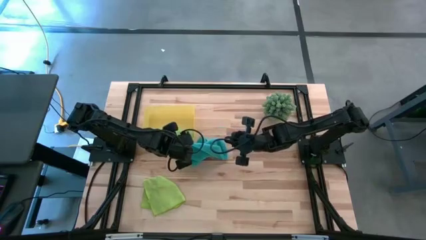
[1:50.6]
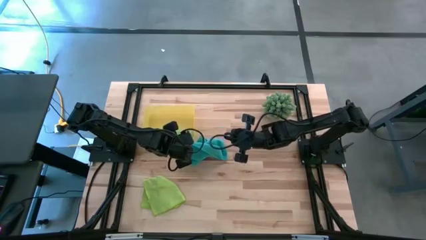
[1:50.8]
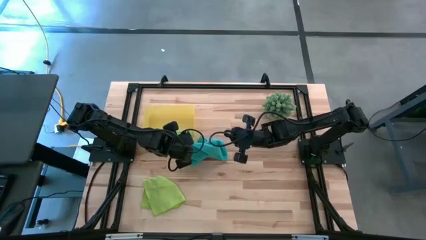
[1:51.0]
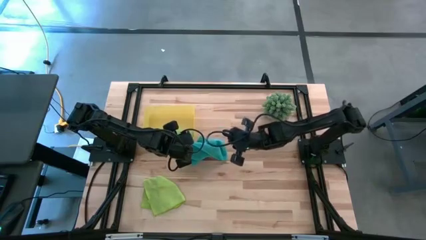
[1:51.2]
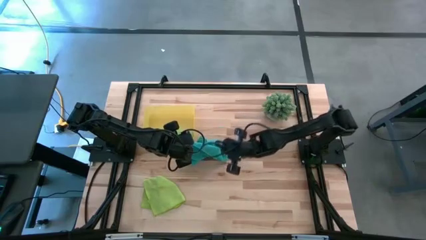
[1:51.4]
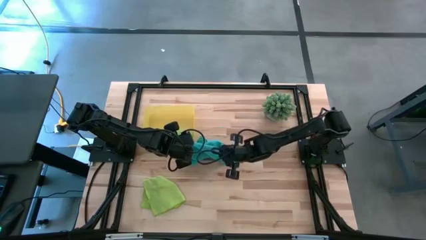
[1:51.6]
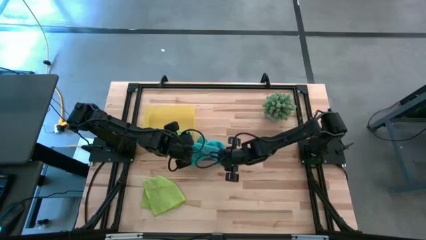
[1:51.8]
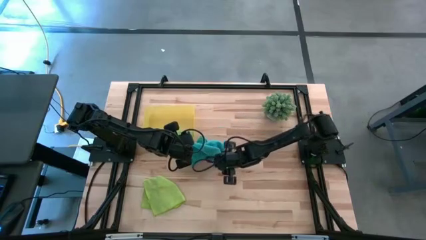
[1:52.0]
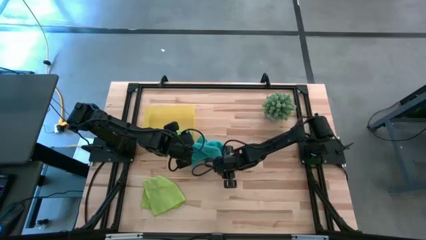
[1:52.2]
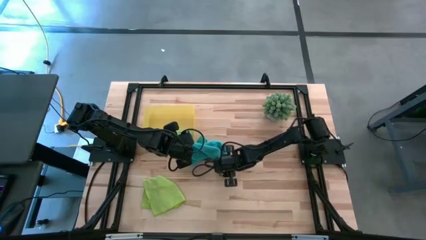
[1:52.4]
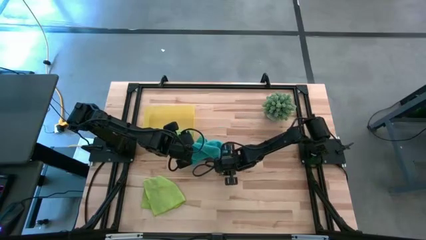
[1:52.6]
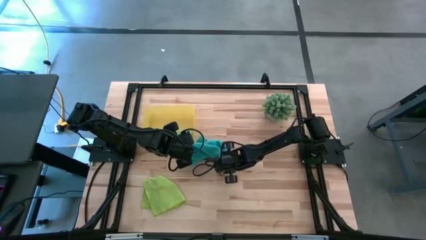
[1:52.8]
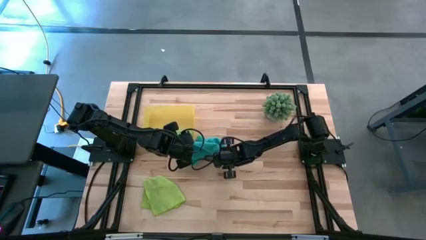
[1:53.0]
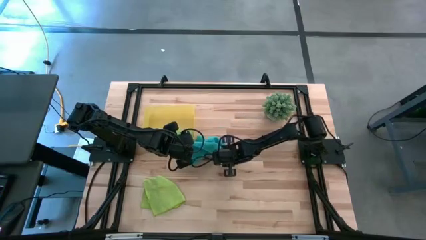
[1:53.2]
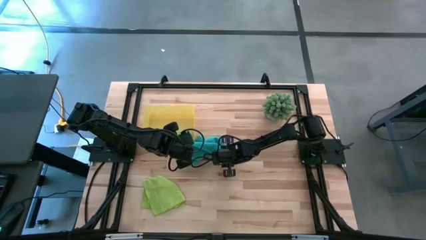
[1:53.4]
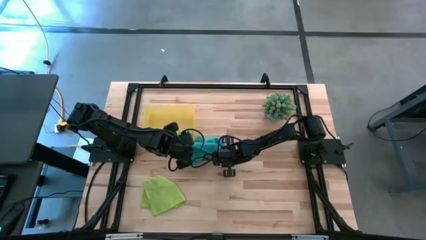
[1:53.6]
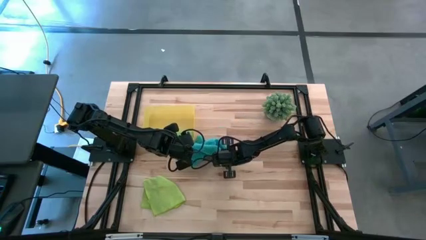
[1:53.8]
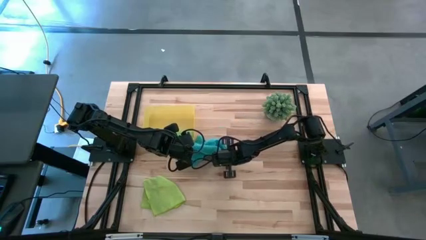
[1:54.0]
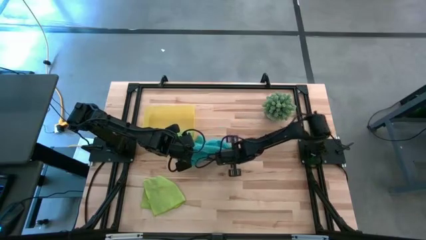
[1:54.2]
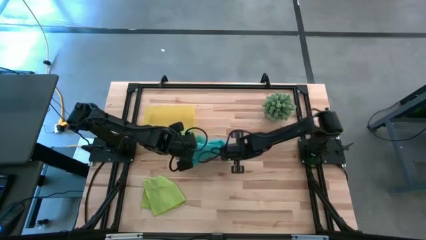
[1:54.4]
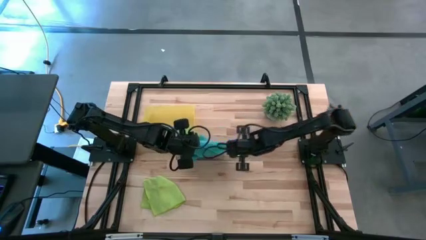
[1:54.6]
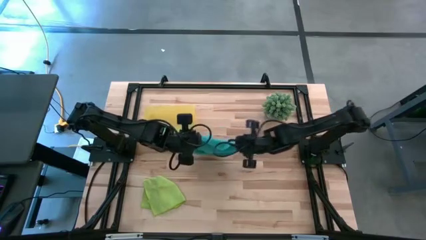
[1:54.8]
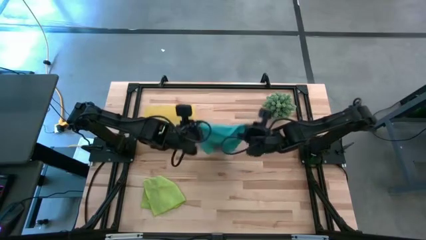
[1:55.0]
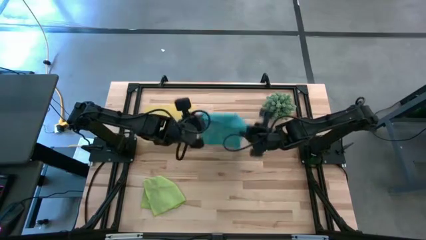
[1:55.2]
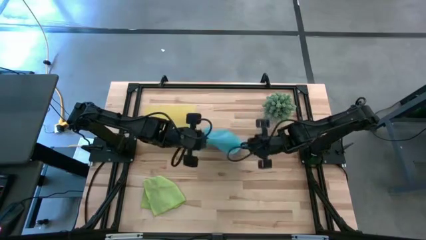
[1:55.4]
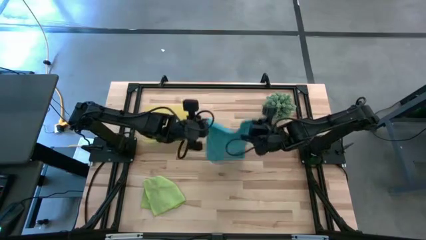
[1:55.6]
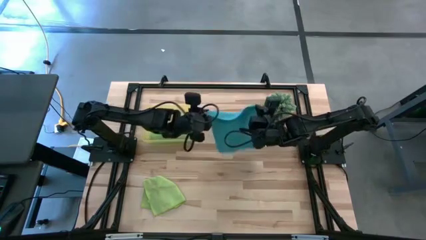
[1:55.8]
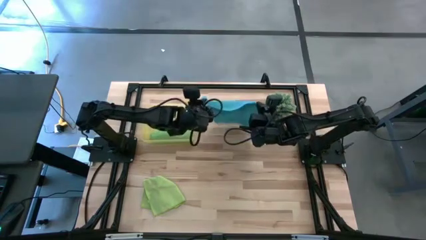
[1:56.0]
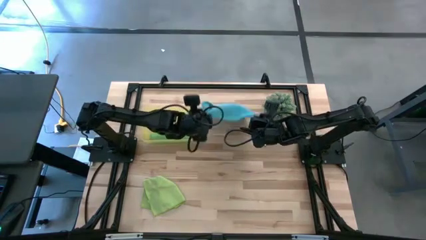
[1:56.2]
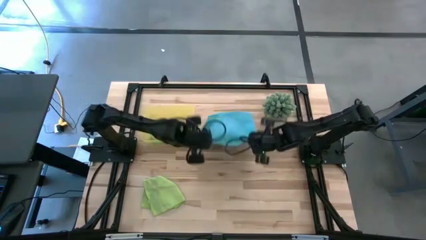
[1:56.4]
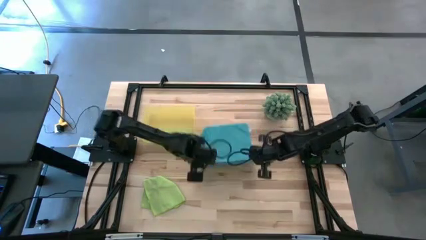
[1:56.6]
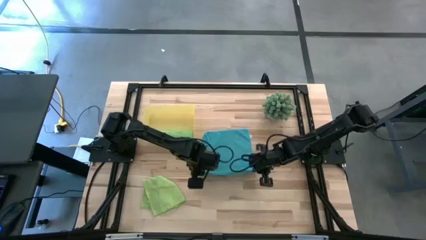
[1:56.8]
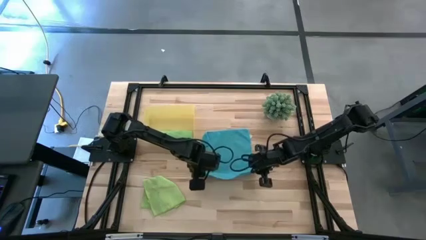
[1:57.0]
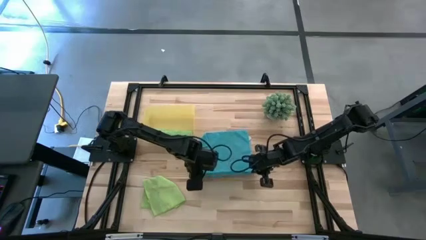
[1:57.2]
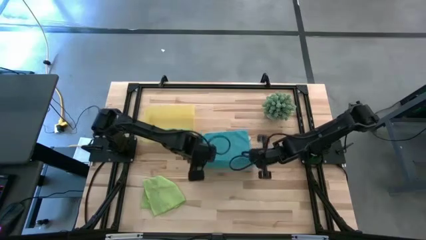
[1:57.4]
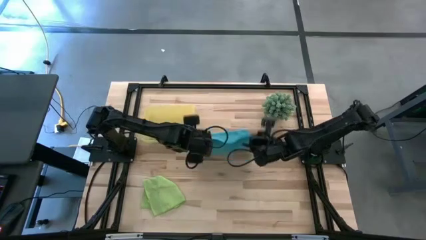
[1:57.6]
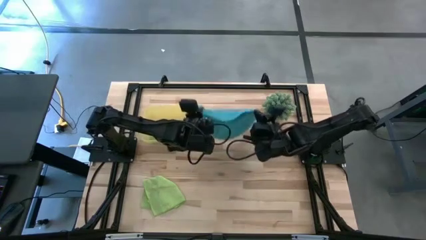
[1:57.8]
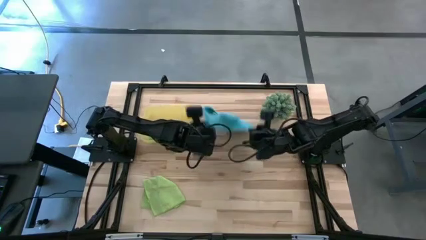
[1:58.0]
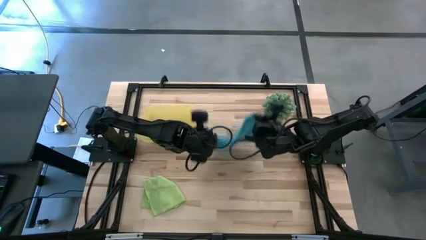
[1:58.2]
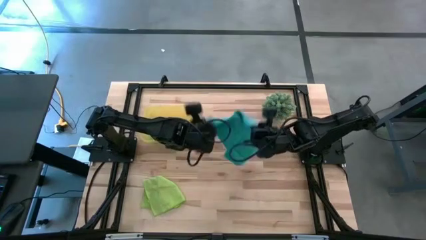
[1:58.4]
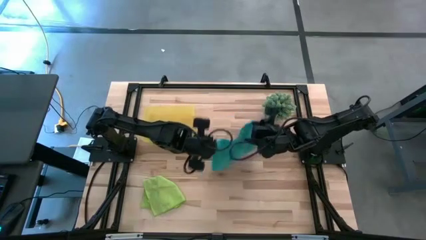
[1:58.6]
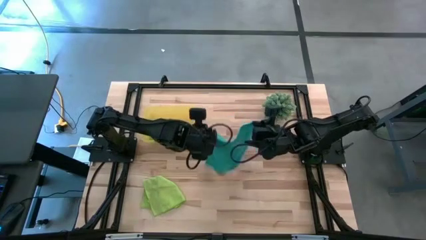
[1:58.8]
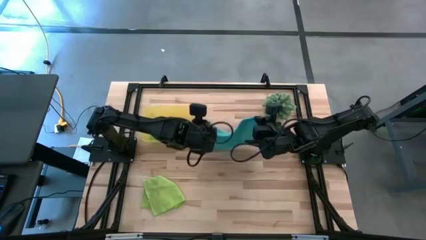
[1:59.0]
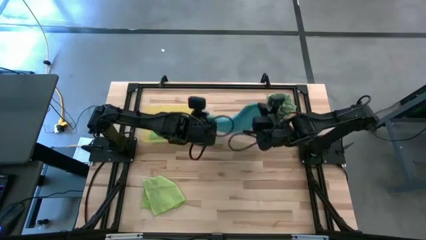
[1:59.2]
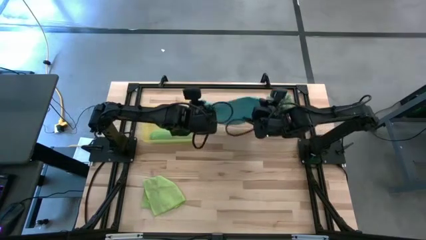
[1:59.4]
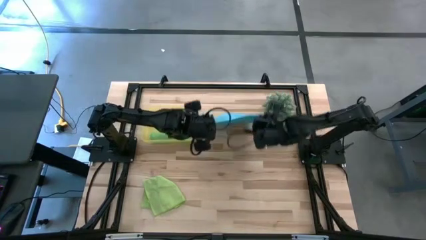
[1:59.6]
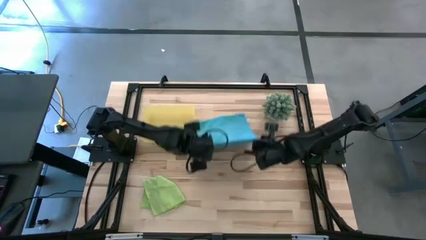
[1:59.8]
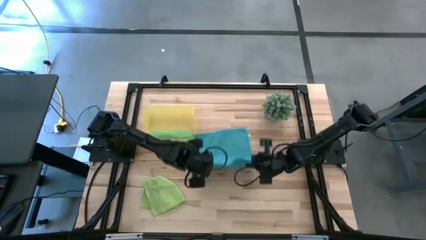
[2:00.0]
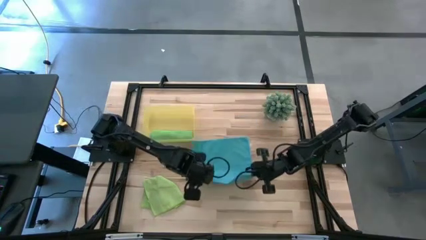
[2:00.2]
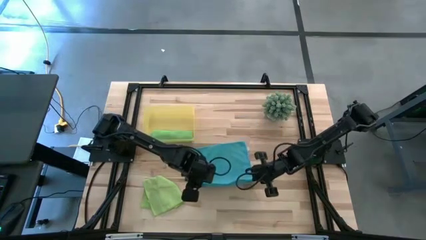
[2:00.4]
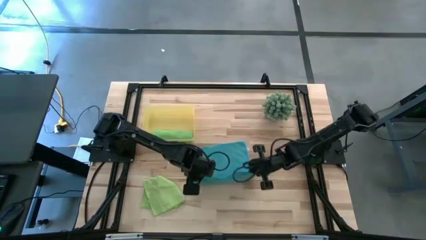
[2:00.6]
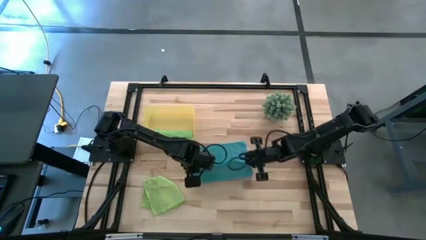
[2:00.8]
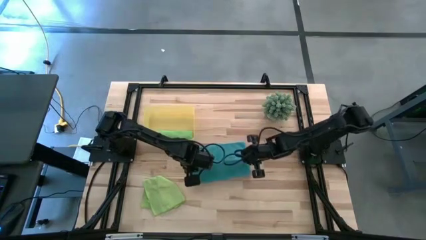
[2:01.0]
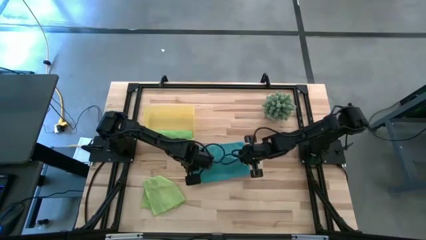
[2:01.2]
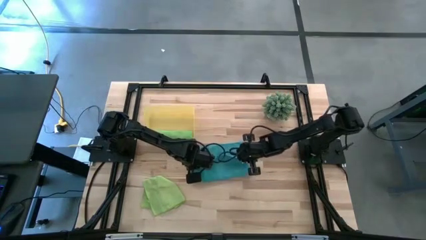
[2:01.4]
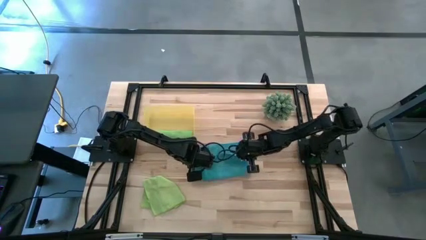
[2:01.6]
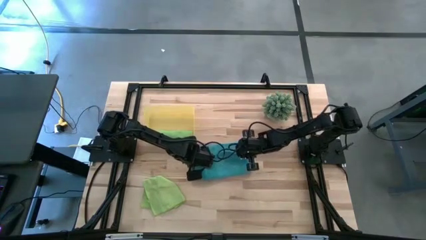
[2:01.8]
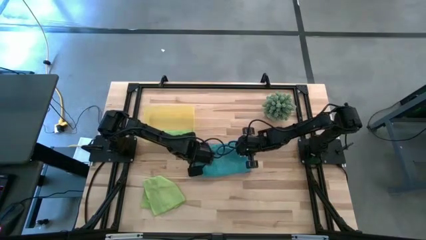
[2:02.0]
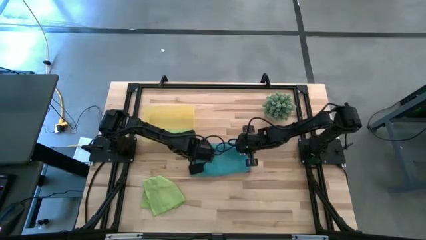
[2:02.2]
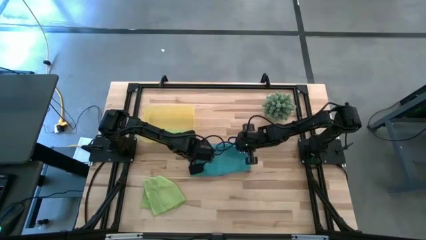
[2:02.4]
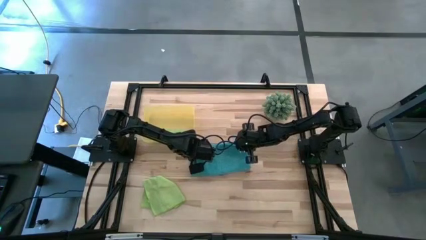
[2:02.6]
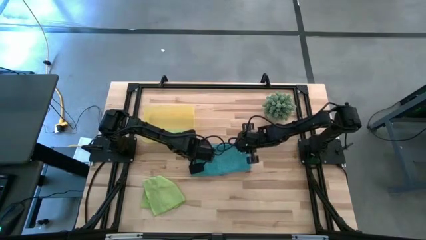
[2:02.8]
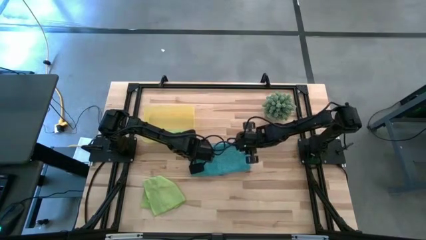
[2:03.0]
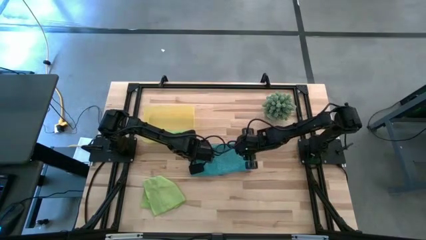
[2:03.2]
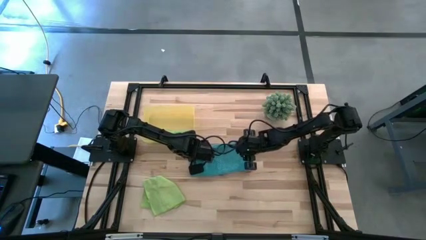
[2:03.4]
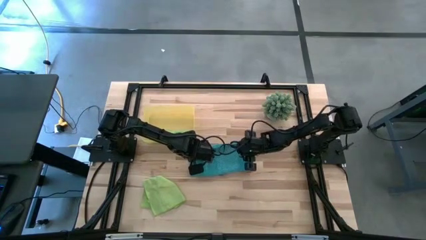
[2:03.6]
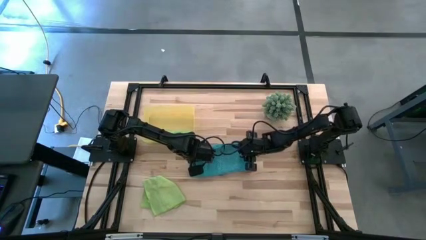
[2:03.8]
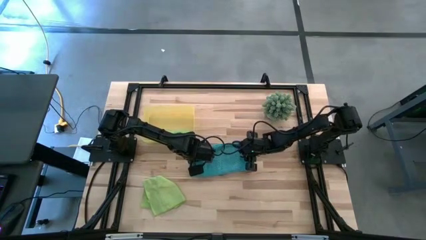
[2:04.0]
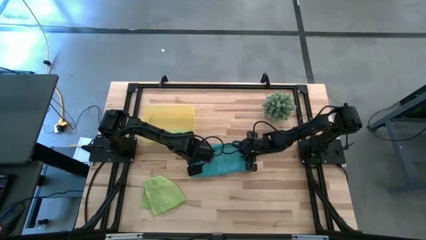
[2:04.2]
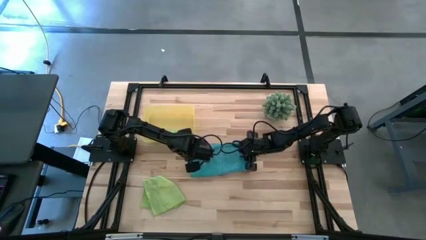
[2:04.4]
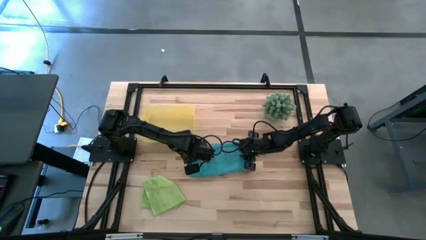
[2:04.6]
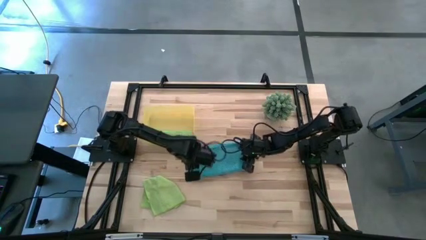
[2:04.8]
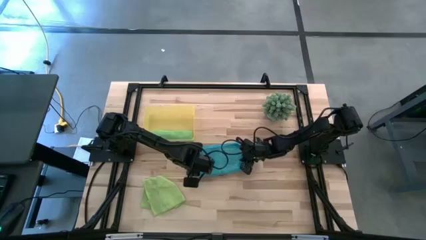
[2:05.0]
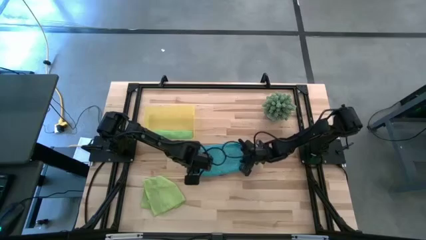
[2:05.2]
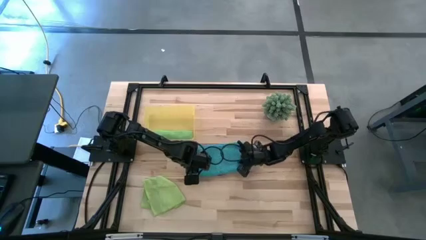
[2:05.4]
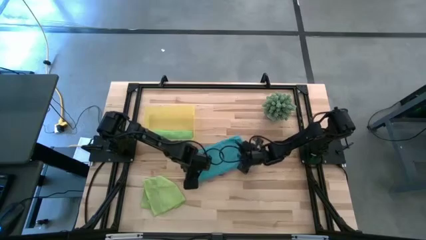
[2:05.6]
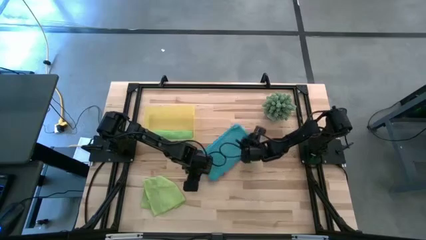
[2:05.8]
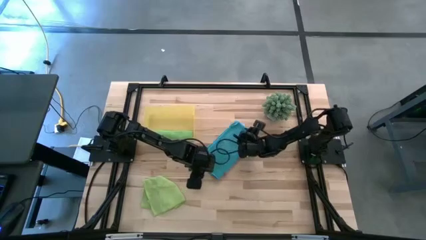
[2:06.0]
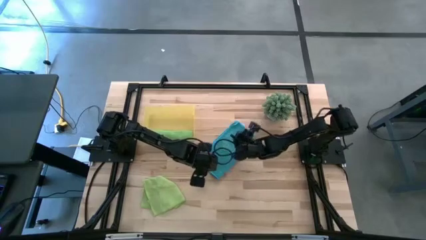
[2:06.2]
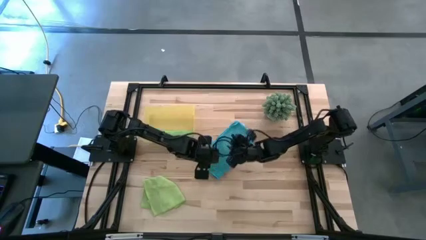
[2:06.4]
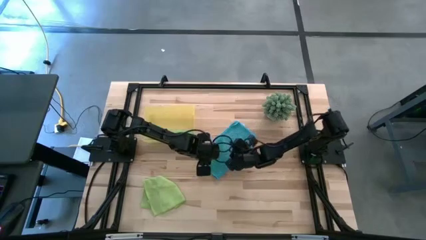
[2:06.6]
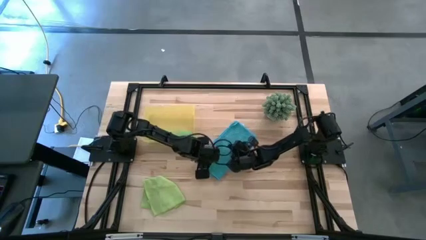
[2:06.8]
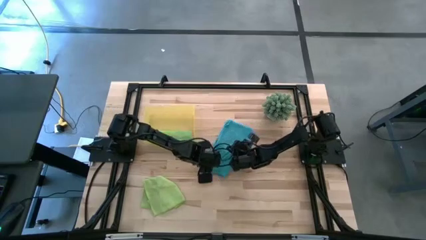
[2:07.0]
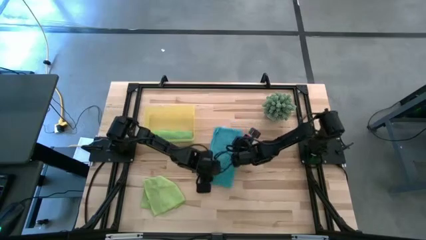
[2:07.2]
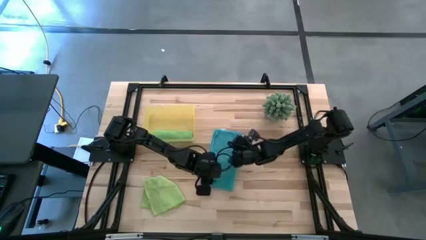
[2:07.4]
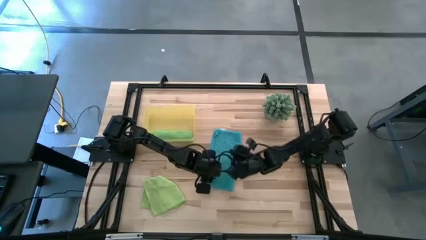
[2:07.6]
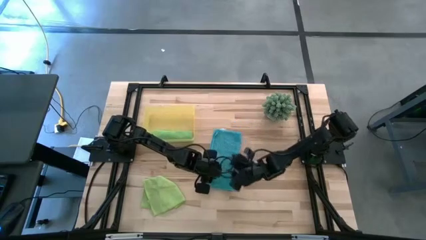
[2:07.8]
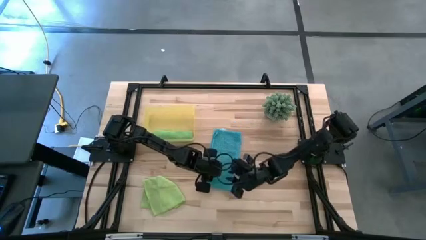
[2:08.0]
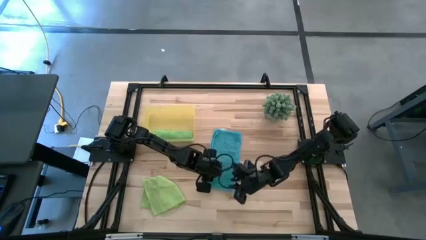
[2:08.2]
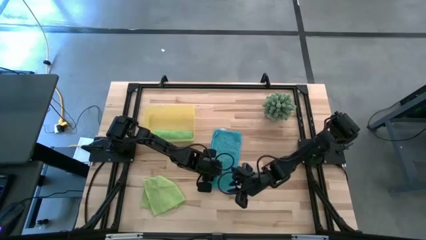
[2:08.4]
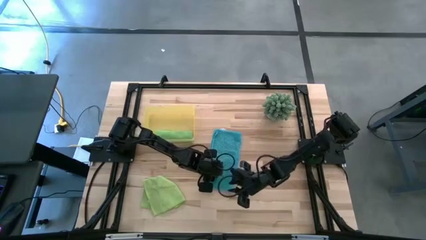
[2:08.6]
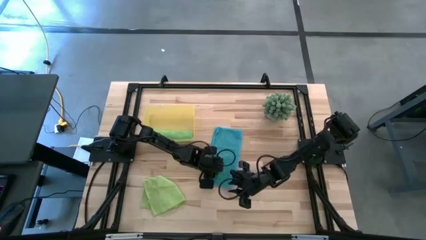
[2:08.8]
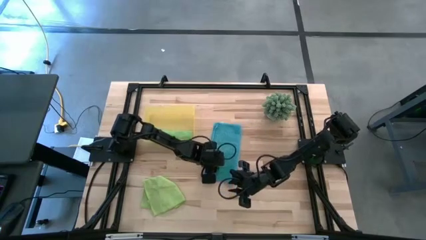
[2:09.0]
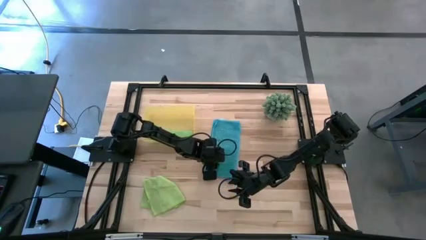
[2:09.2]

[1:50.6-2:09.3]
Task: Roll microfiber towels into tight, uniform cylinder then place into a basket
Fold the blue microfiber towel
